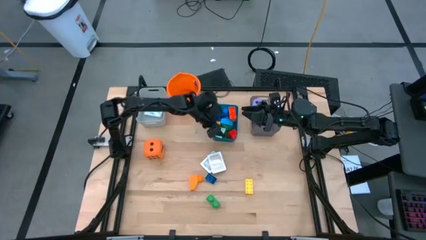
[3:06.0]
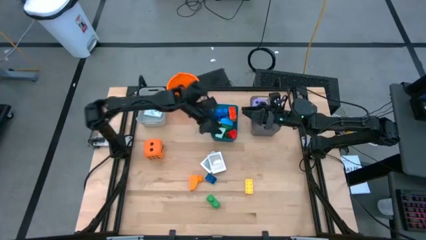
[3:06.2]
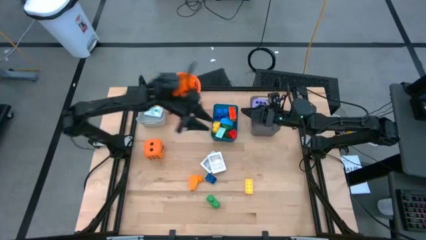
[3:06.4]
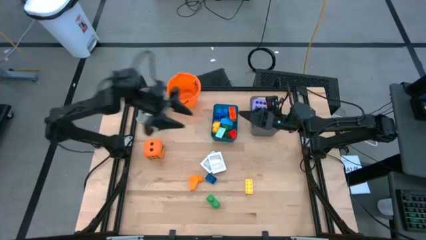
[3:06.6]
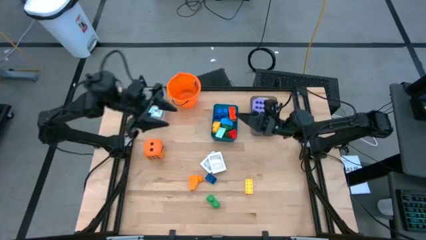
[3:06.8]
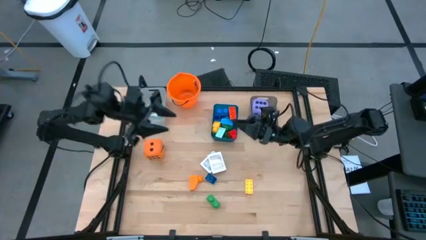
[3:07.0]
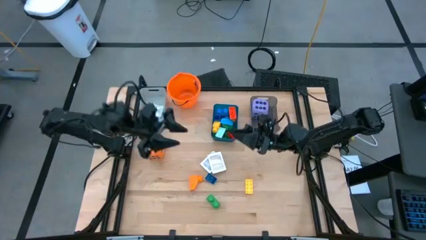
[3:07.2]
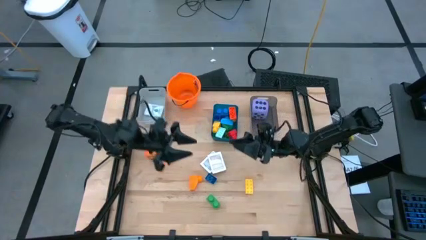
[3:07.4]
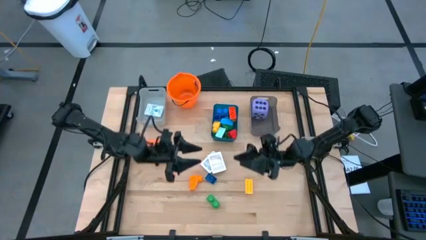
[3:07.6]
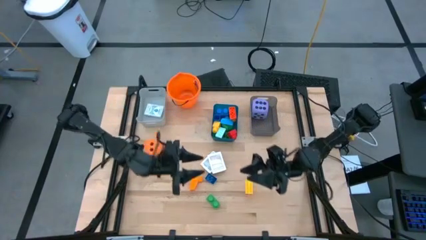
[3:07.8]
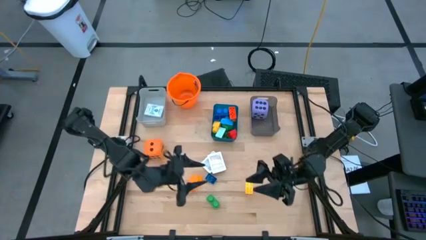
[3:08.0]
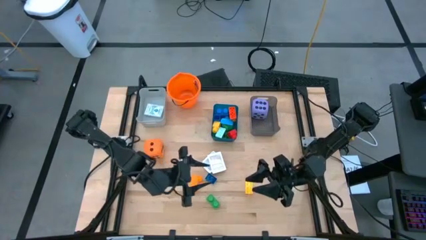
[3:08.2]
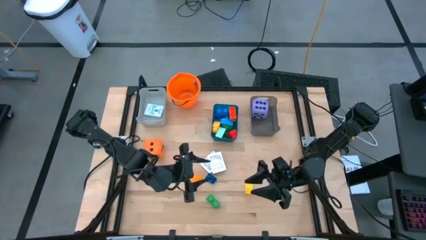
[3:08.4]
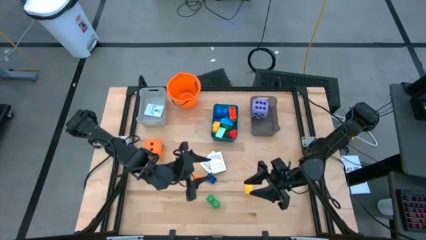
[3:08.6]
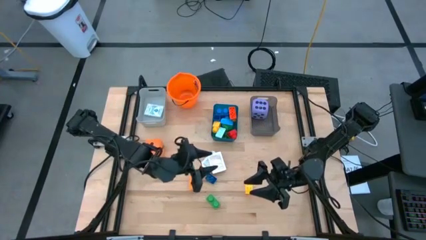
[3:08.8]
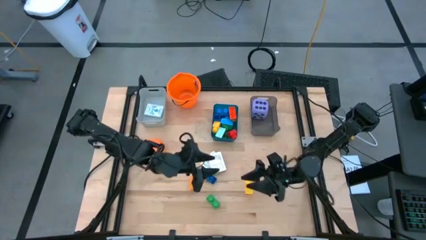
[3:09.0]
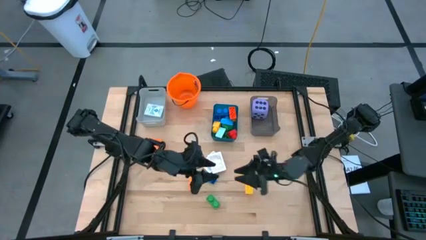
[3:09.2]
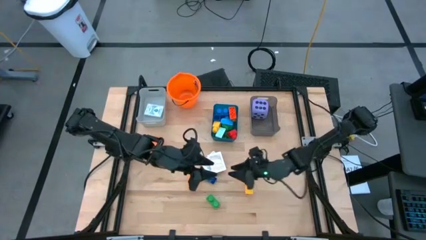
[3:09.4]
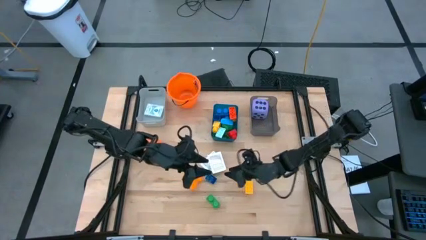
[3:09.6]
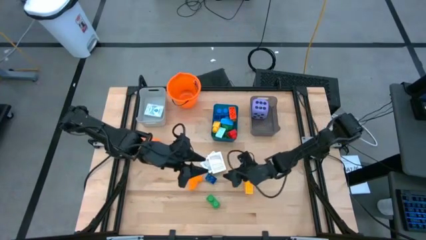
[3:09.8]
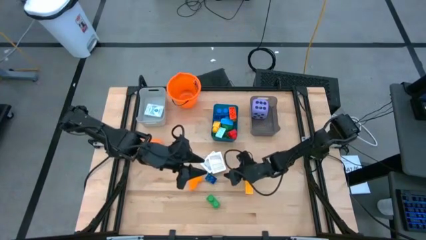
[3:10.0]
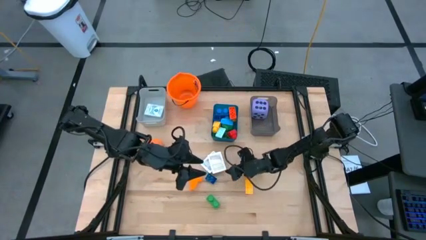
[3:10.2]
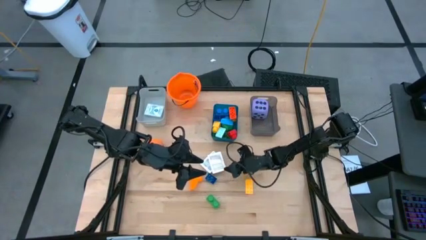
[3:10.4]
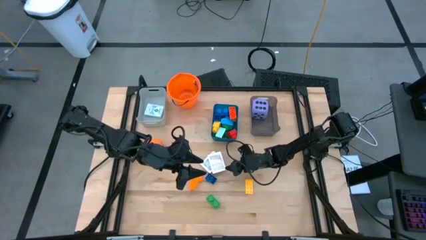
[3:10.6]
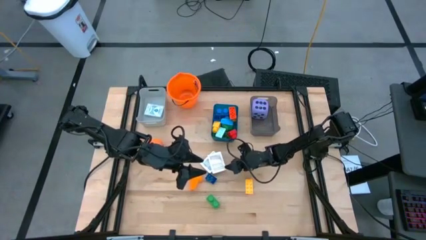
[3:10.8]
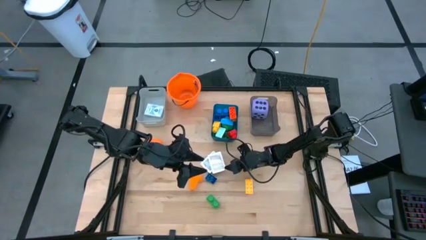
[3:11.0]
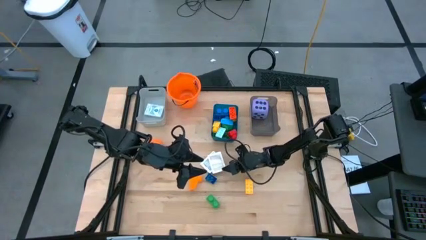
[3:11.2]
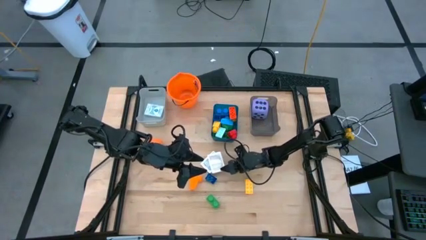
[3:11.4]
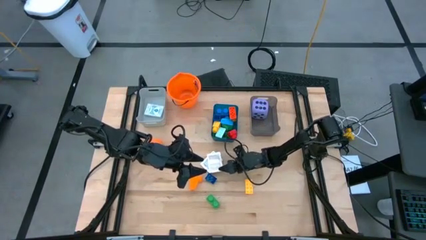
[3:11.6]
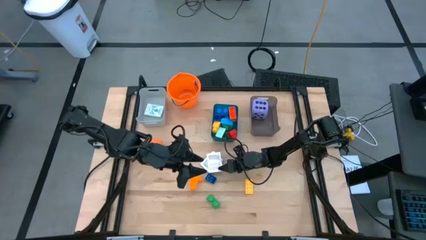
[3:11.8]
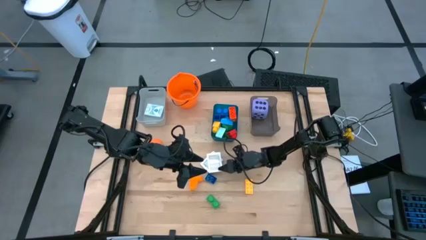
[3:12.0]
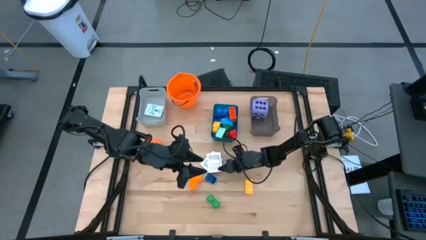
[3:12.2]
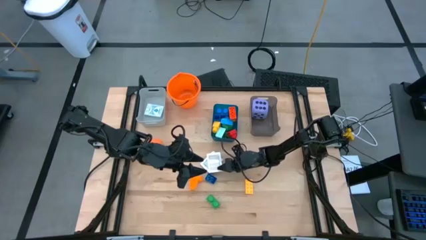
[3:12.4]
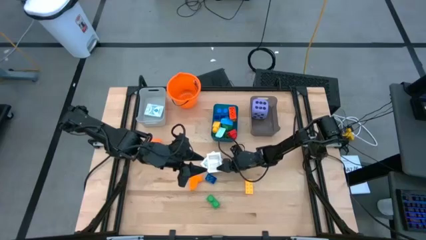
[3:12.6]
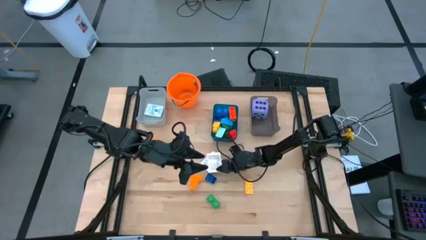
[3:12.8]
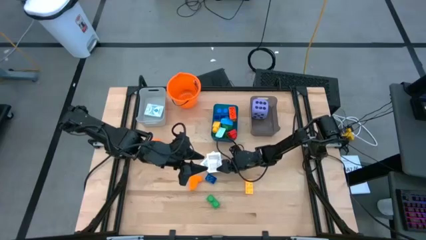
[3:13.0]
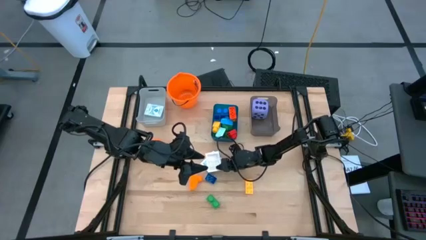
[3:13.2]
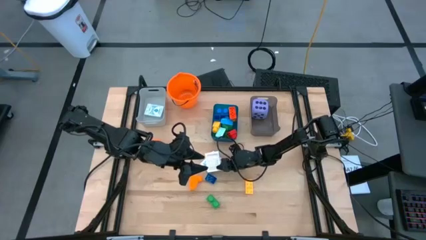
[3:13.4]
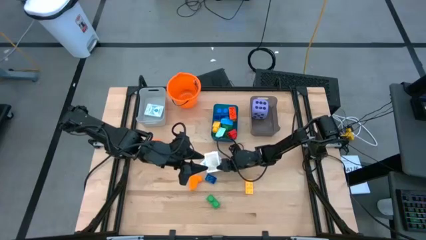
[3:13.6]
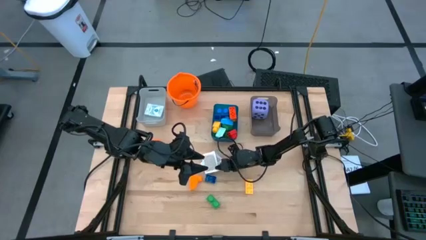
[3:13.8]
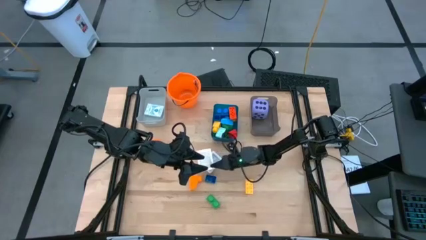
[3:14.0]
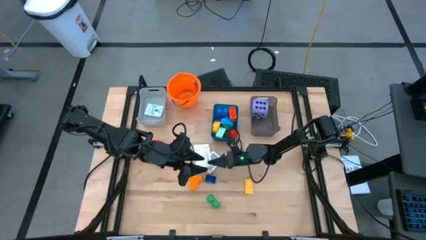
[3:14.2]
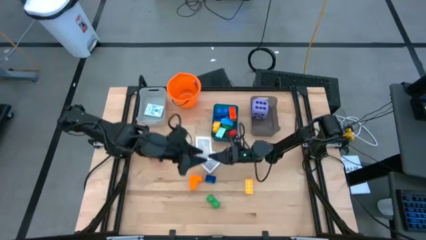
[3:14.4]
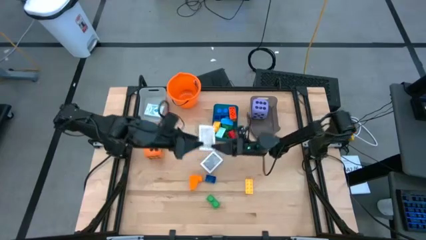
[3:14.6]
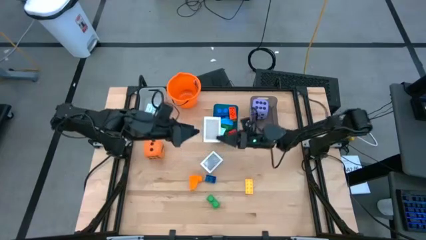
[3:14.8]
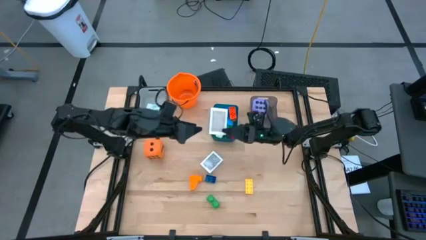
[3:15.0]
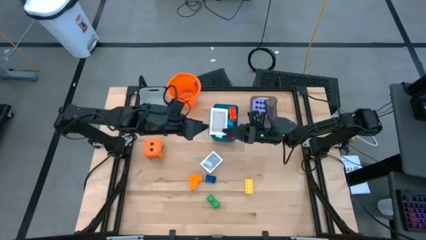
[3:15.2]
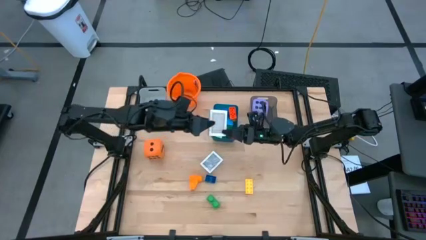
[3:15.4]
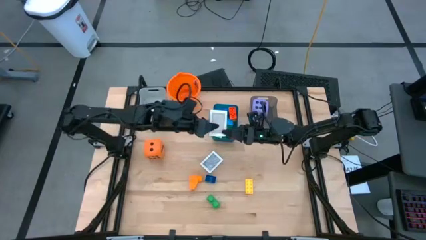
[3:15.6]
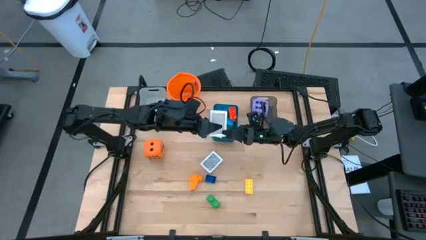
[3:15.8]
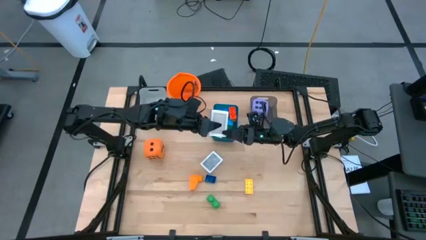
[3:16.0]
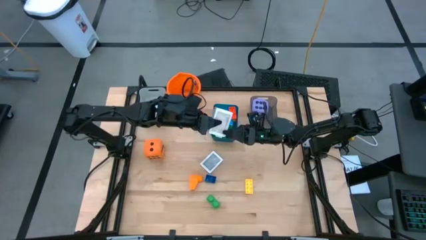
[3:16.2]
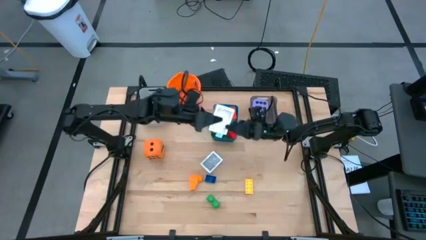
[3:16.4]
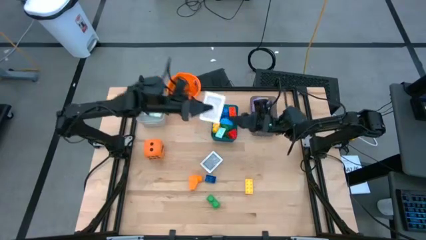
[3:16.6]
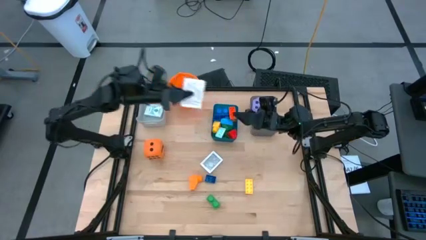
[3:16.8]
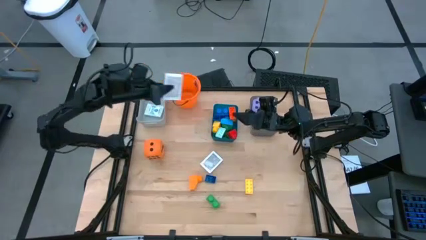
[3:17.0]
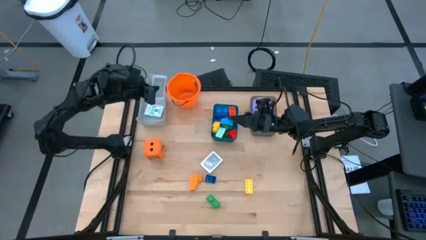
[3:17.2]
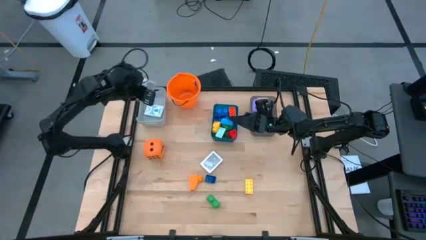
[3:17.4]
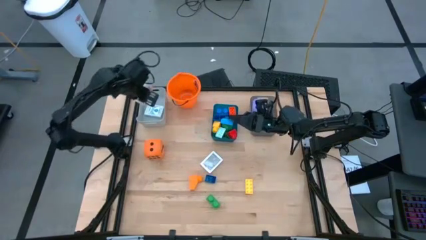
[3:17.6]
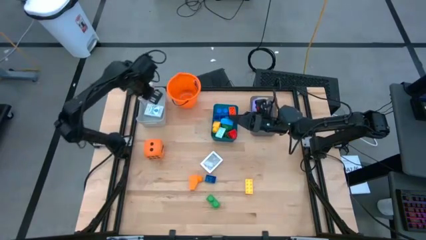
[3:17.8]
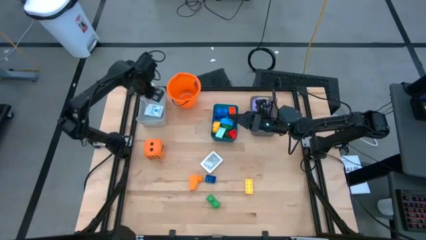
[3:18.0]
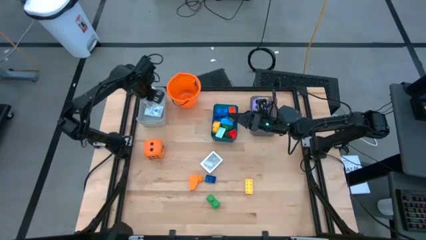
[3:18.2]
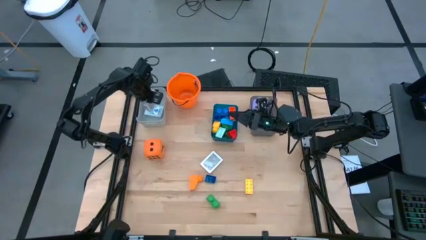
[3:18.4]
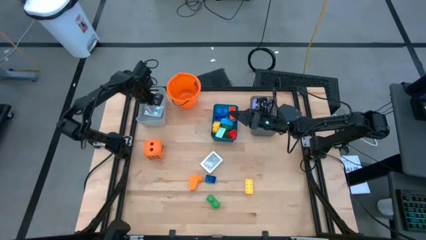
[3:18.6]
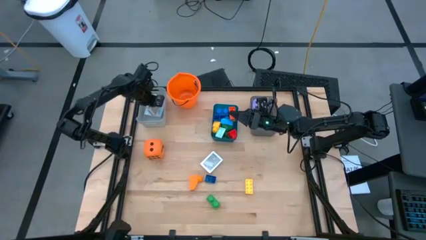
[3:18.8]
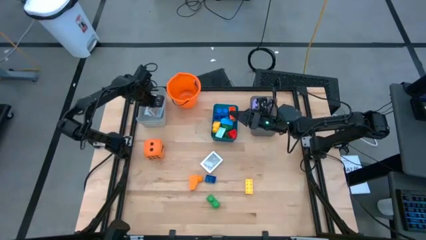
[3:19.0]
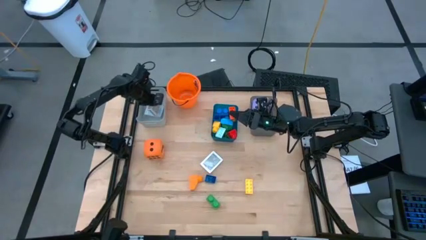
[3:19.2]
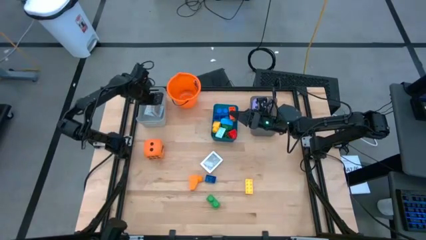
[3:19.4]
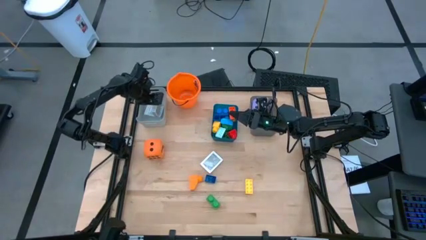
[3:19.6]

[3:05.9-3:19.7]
Task: Pick & Place Toys
Put the brown deck of cards into the gray bin

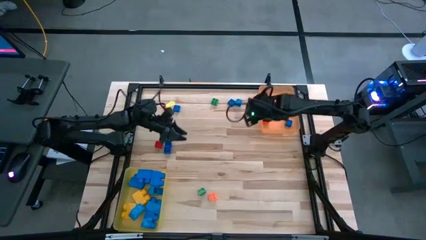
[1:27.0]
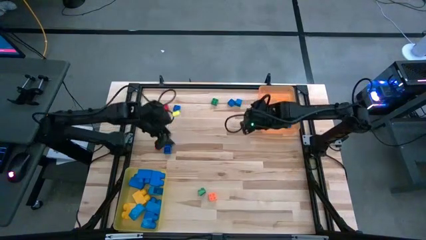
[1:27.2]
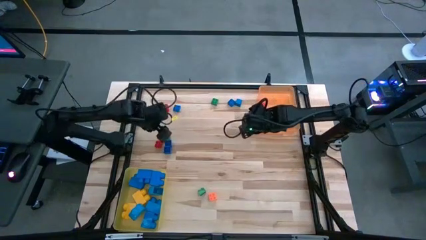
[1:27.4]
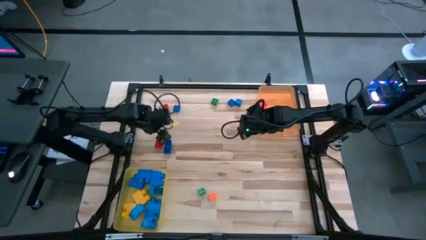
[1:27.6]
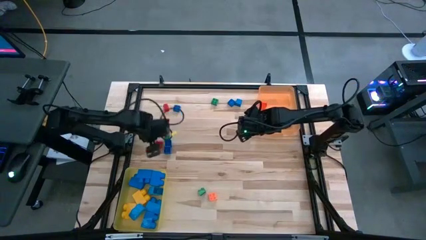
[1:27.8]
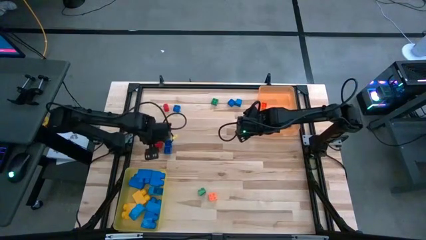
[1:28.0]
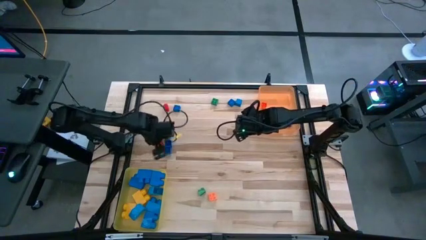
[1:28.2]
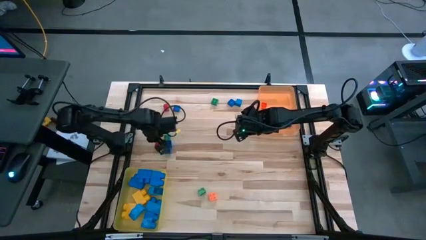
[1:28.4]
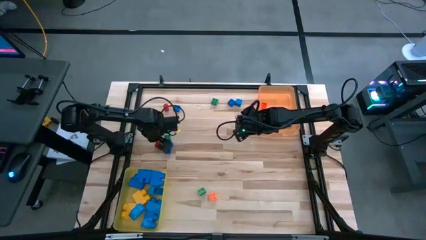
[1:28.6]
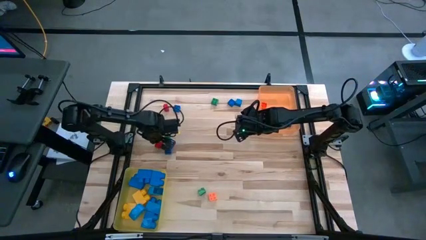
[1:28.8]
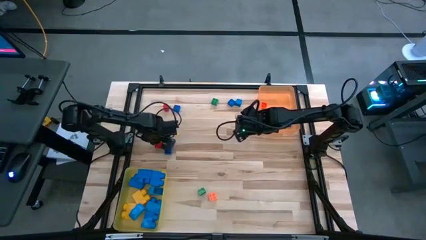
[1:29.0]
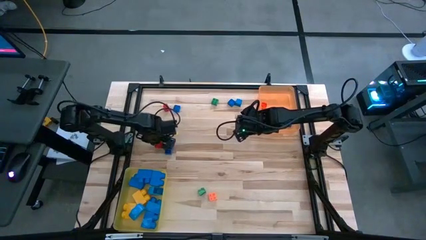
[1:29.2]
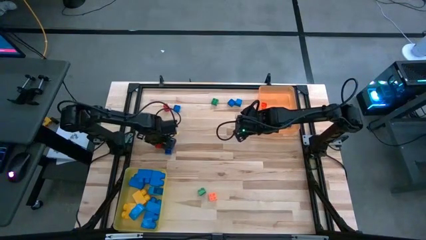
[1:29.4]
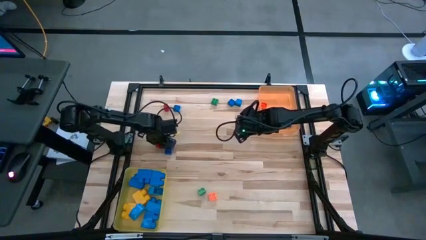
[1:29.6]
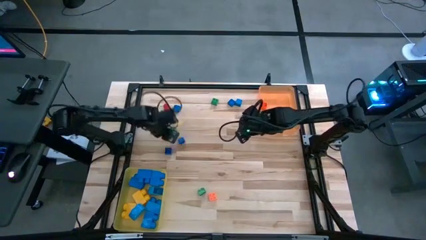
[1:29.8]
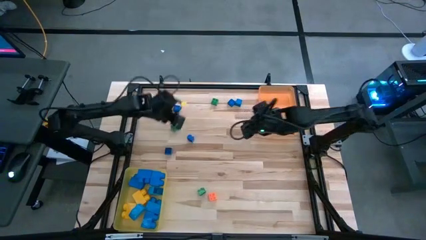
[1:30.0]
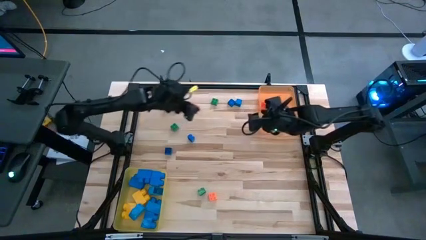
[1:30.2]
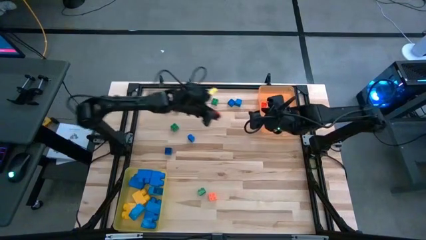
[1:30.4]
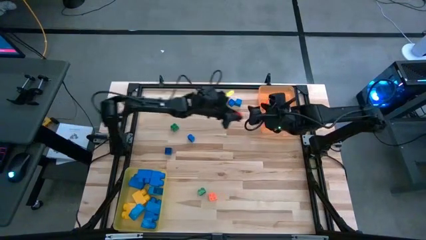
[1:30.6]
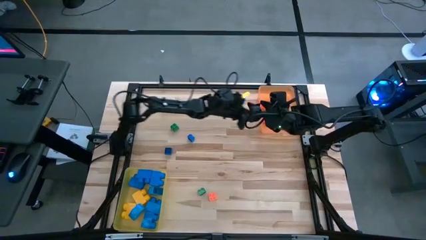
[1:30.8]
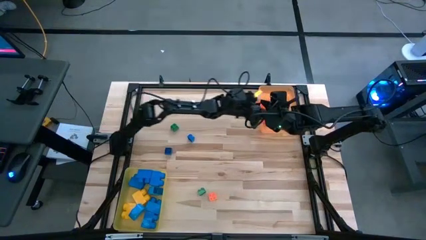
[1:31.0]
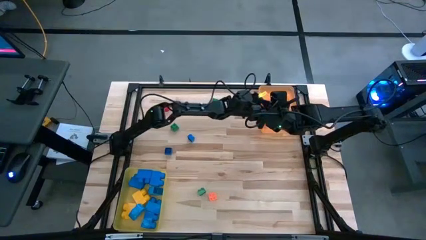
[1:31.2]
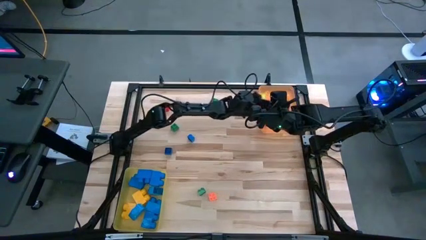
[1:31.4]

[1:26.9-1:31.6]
Task: Sort blocks by size
Put the small red game piece into the orange bin
